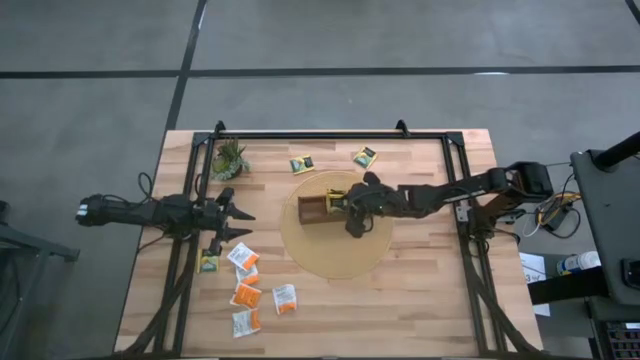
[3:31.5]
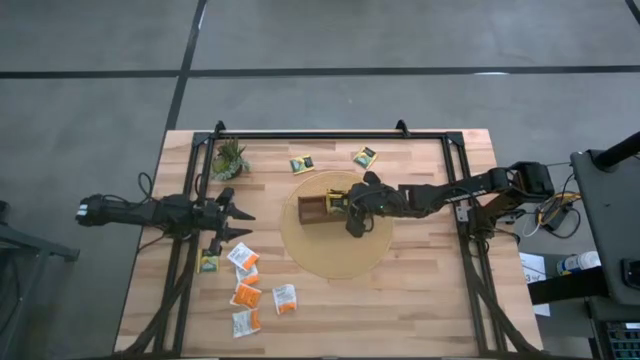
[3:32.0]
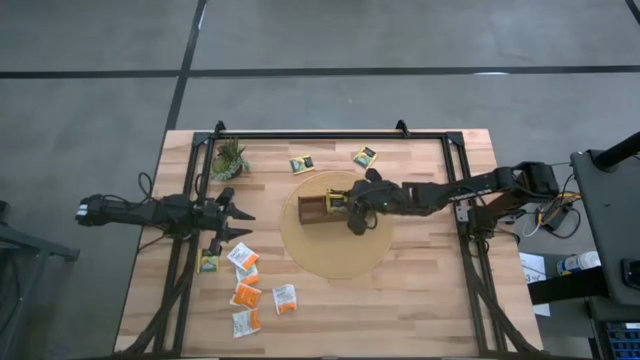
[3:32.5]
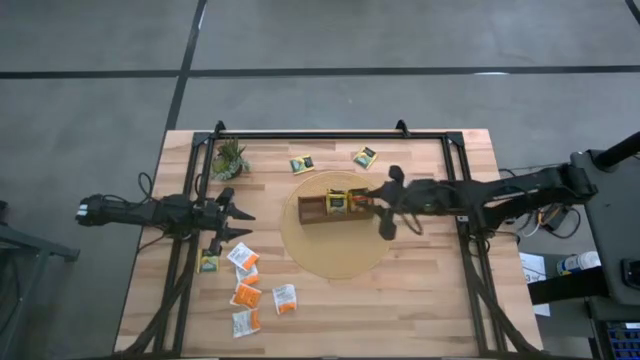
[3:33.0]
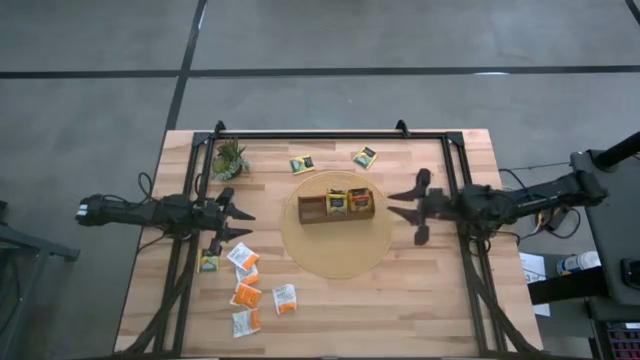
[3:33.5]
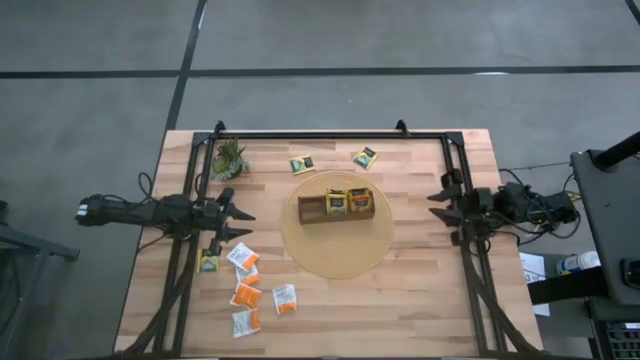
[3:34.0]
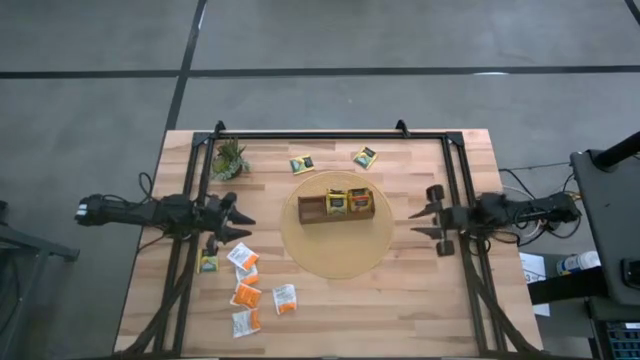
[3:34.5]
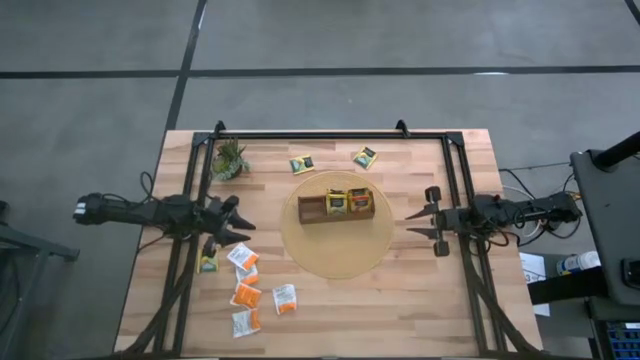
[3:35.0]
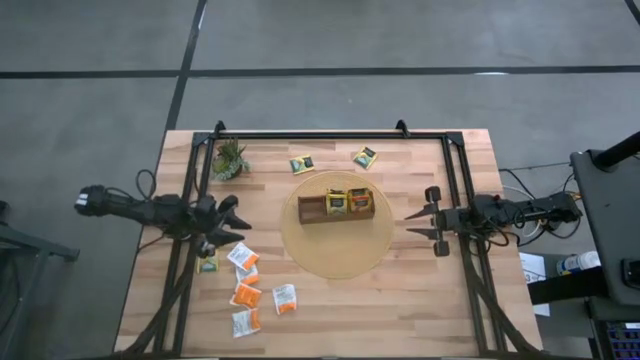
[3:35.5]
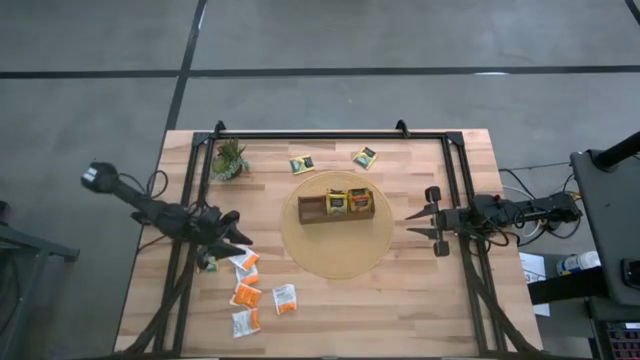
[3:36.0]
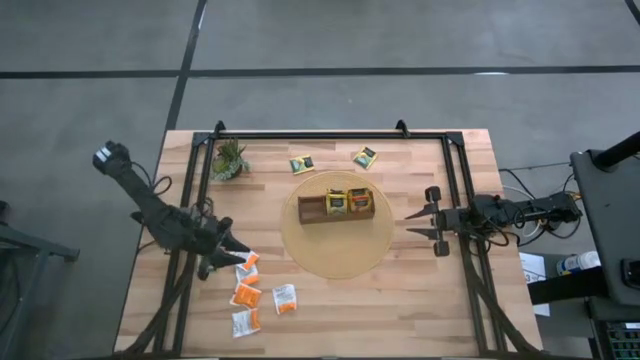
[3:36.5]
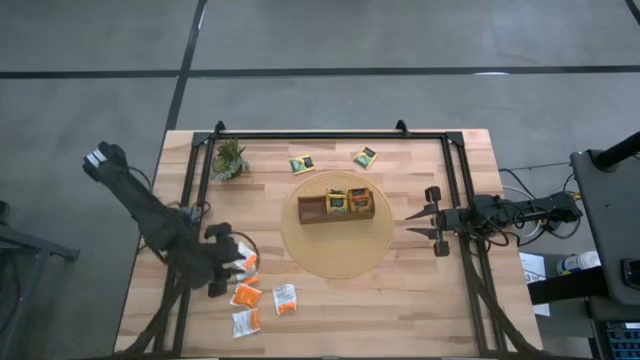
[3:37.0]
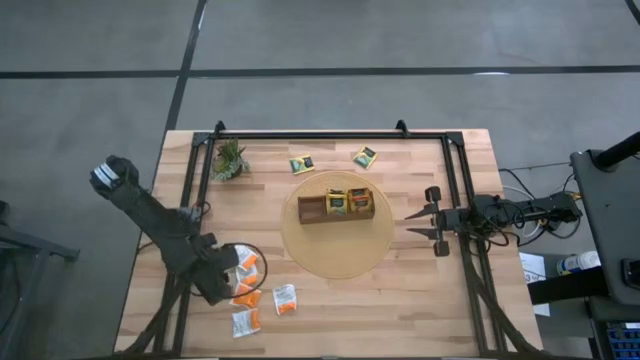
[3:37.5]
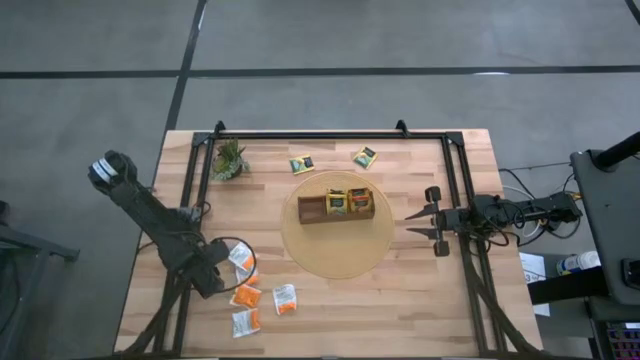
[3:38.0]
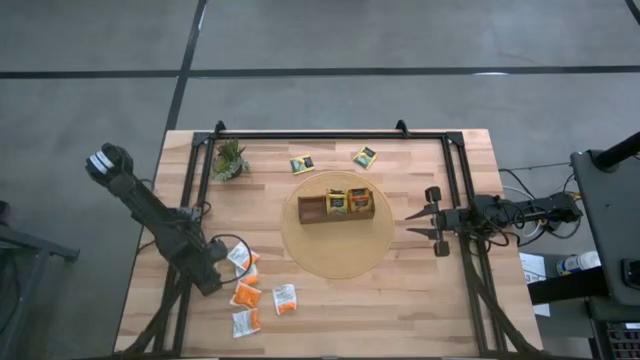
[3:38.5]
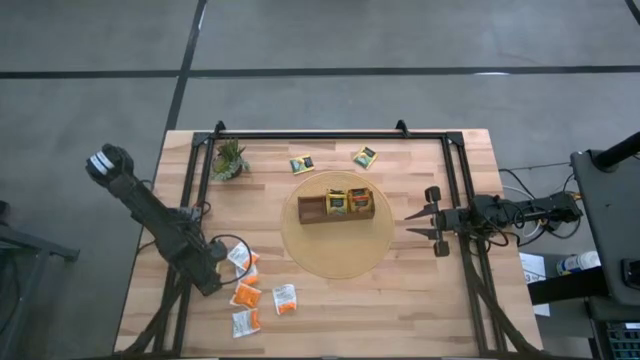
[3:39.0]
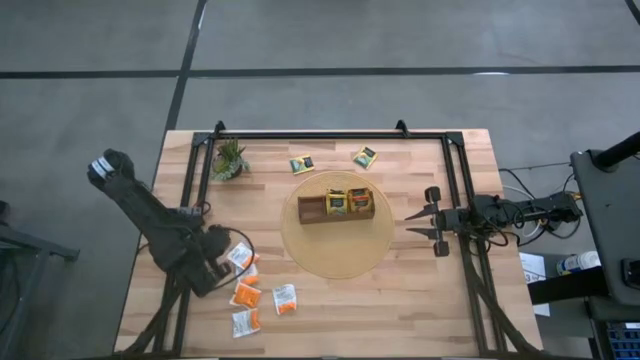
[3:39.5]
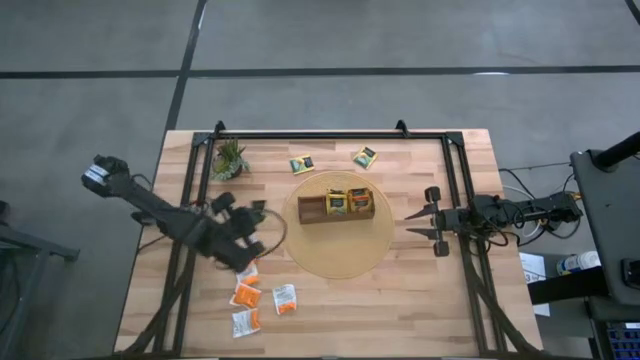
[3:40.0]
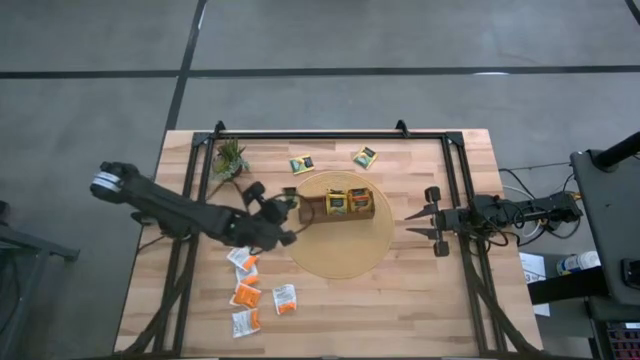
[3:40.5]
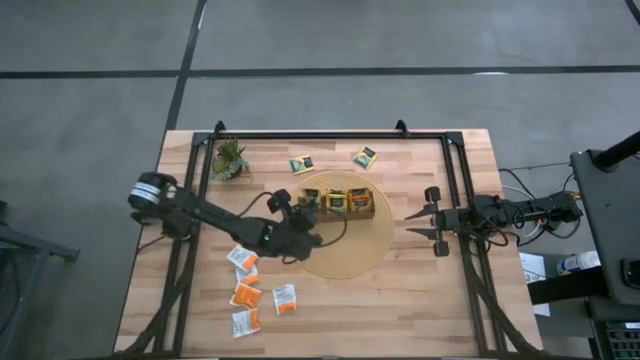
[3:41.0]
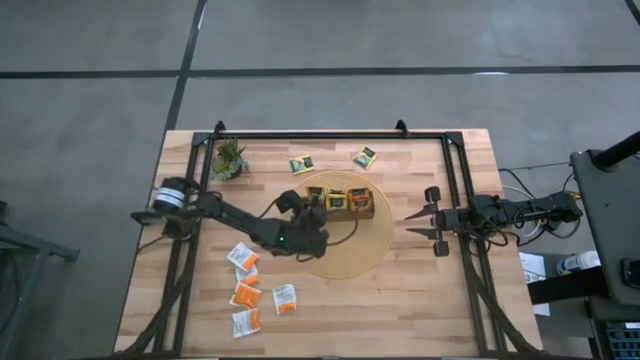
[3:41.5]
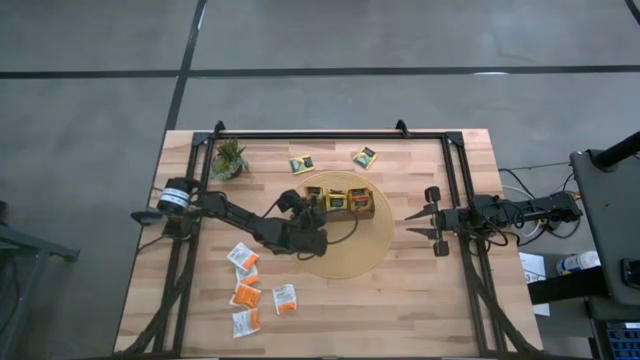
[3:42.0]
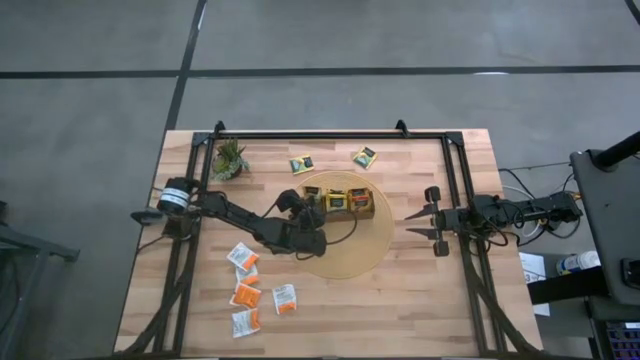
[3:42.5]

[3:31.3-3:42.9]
Task: Pick & Place Tea
Put the yellow tea bag into the left section of the wooden organizer

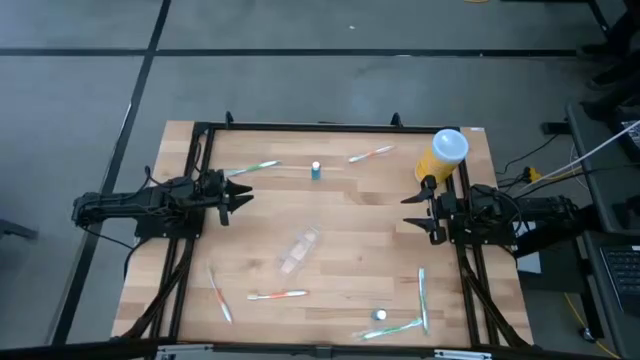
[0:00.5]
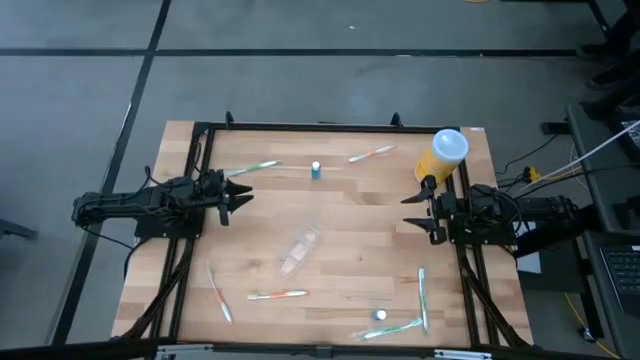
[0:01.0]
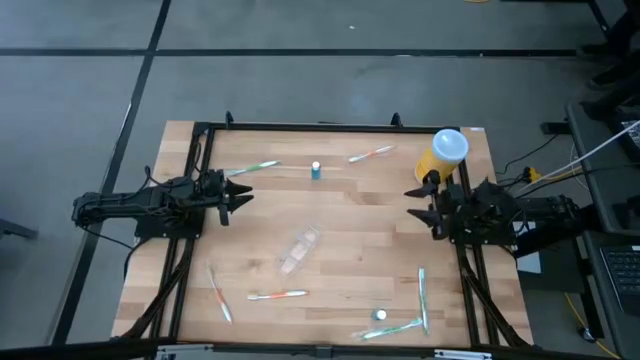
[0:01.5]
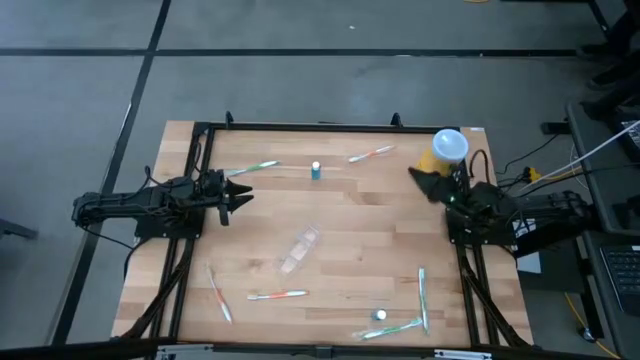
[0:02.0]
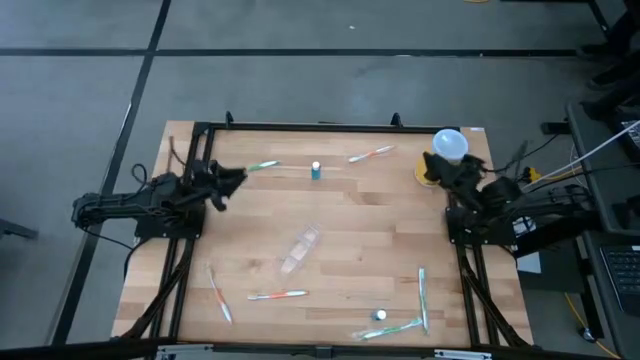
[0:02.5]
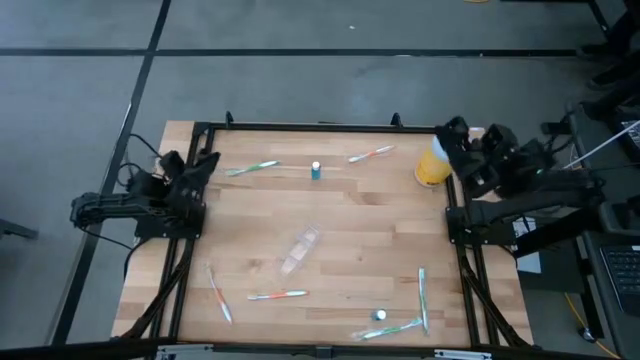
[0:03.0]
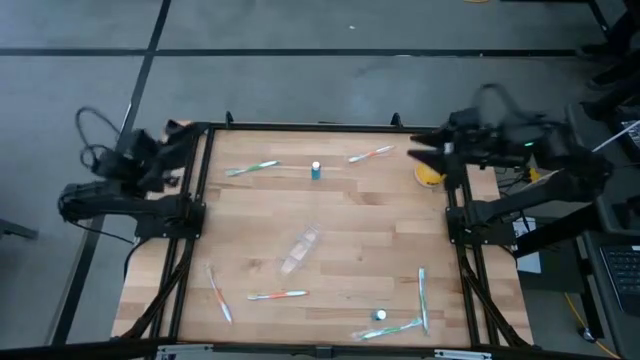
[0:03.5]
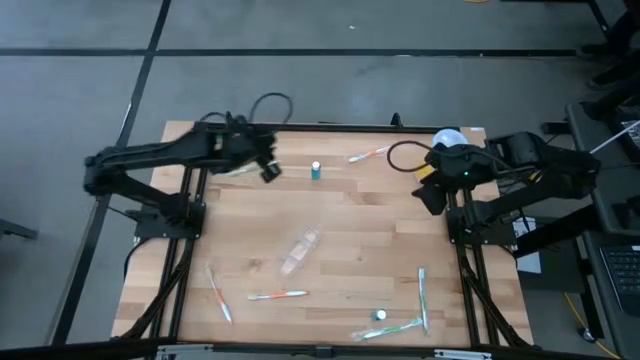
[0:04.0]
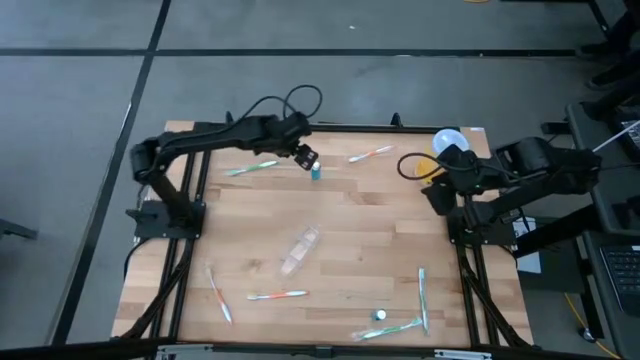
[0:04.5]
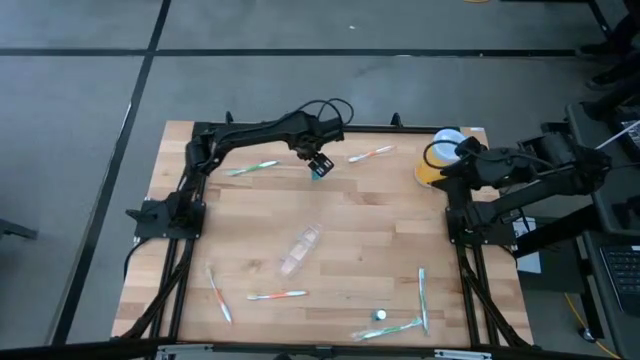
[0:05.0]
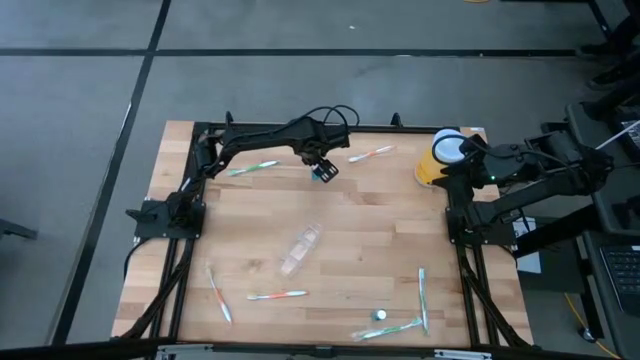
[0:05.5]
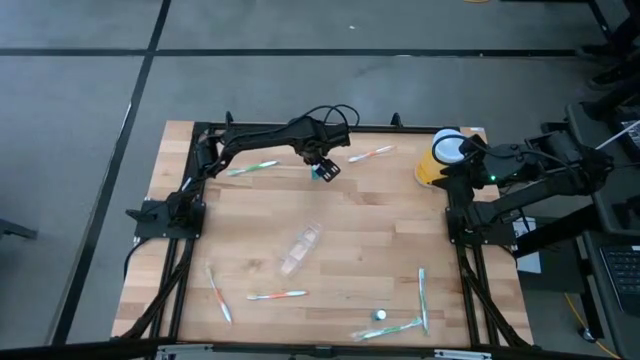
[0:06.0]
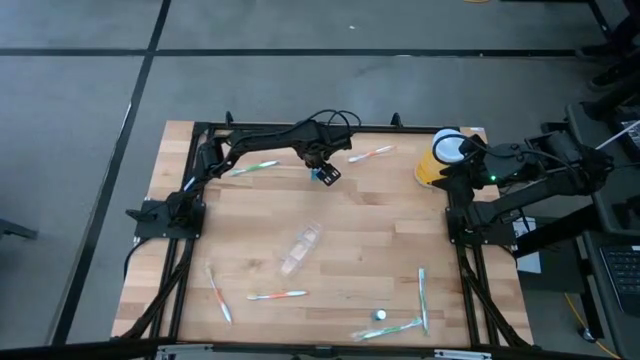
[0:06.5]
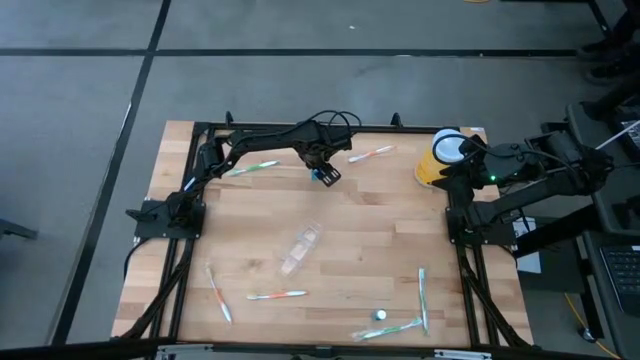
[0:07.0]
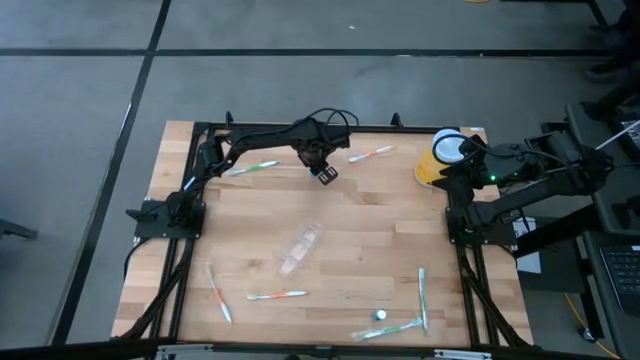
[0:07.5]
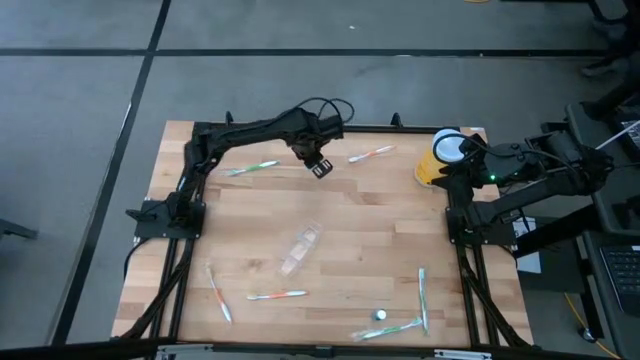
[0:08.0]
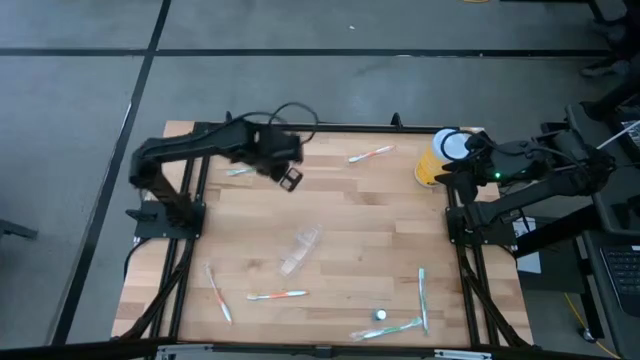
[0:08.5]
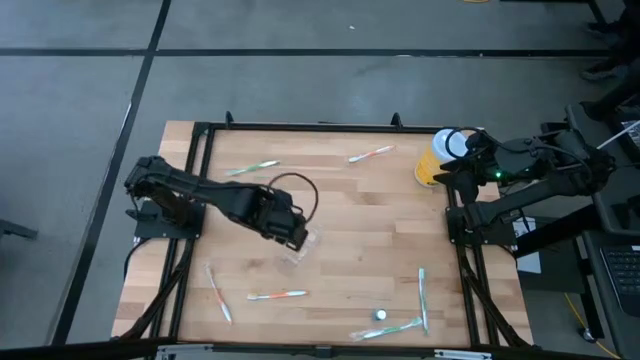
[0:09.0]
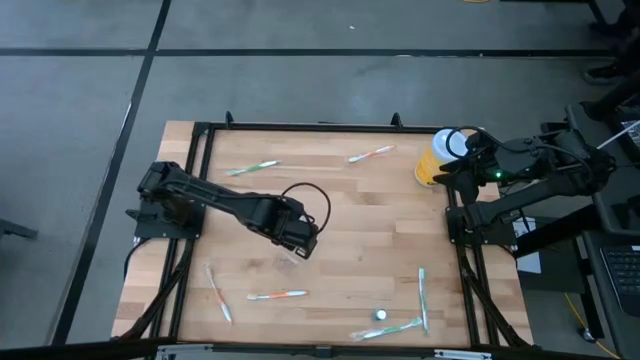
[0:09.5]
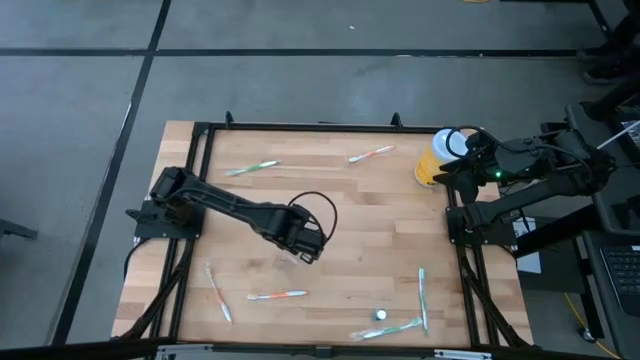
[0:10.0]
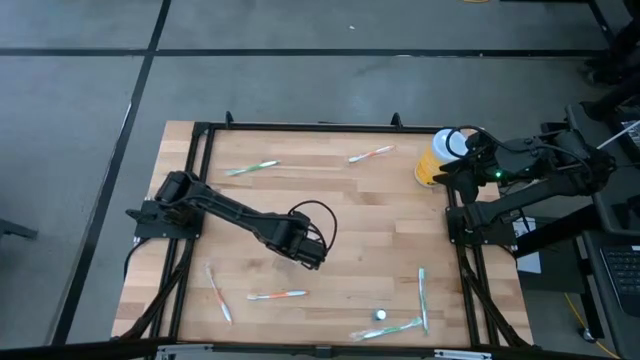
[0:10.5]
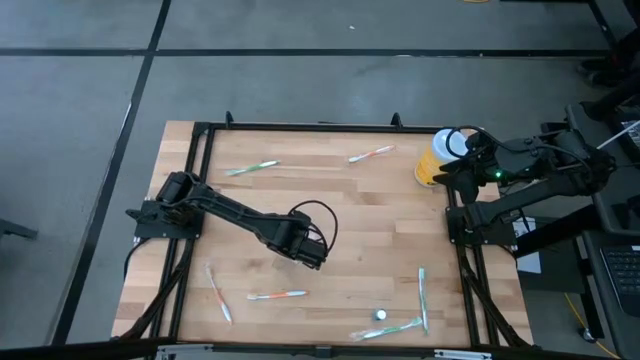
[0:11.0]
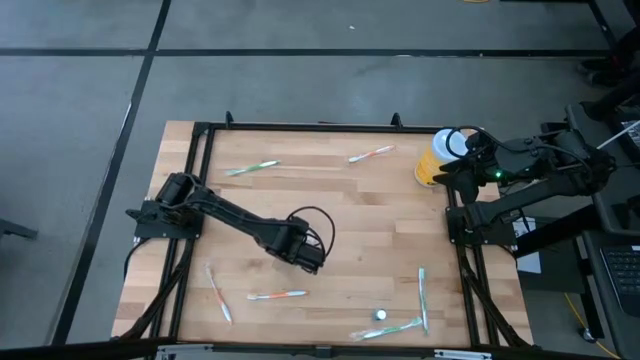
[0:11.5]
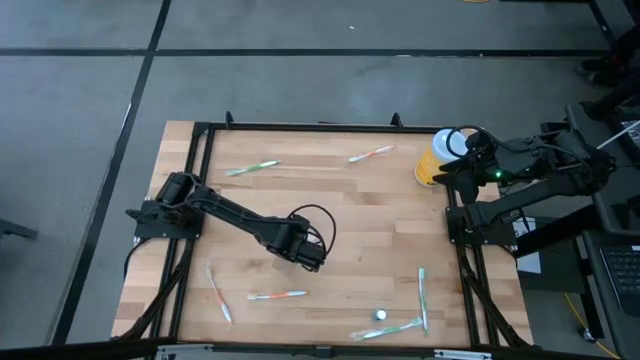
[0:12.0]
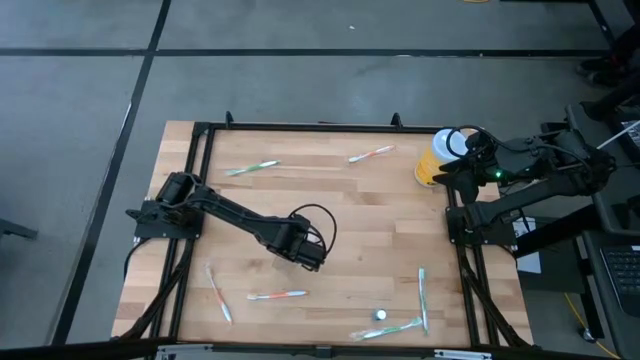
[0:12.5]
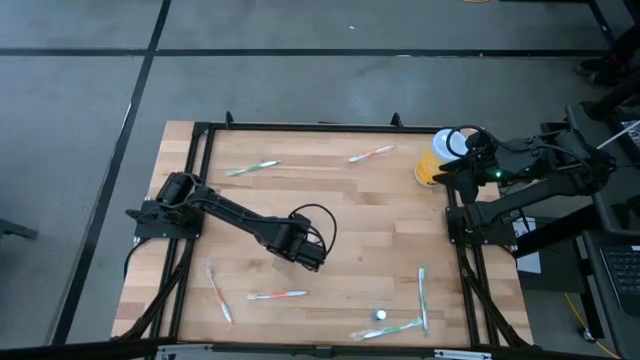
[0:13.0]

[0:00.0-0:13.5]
Task: Pick & Place toothbrushing station
Put the top mouthwash into the transparent organizer
